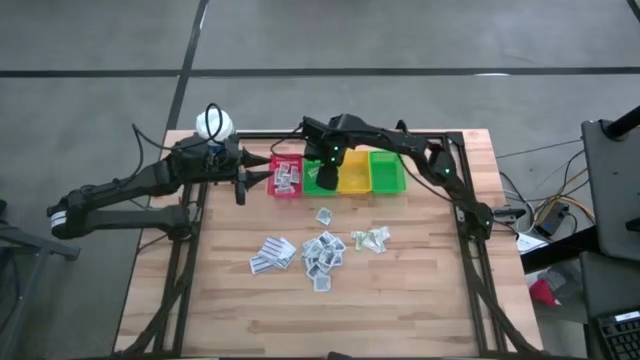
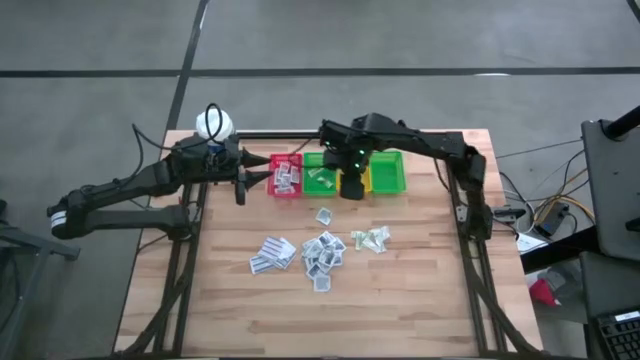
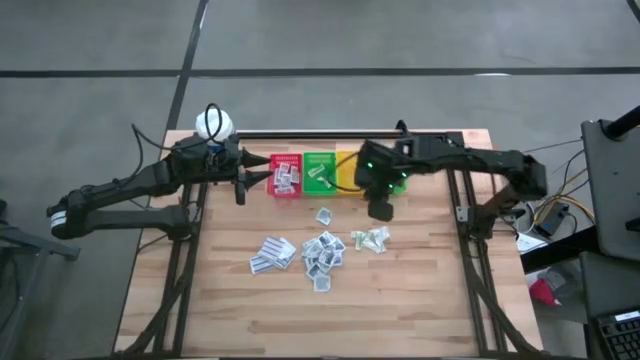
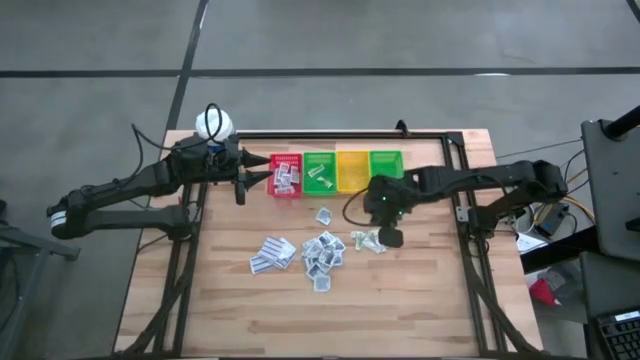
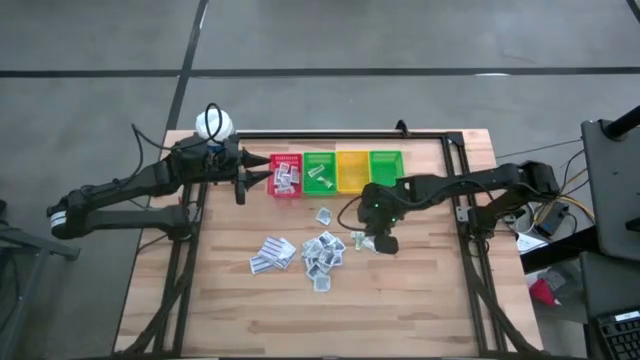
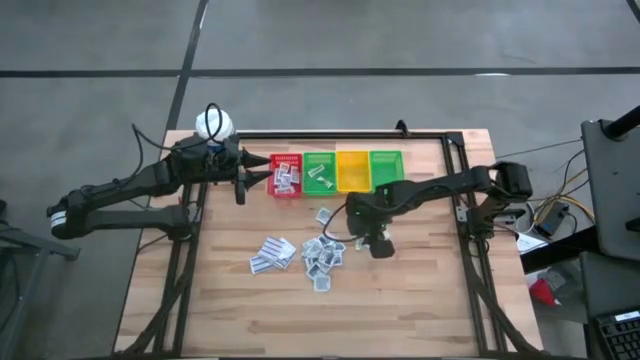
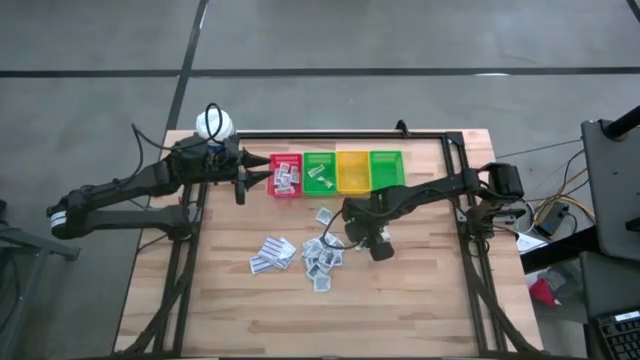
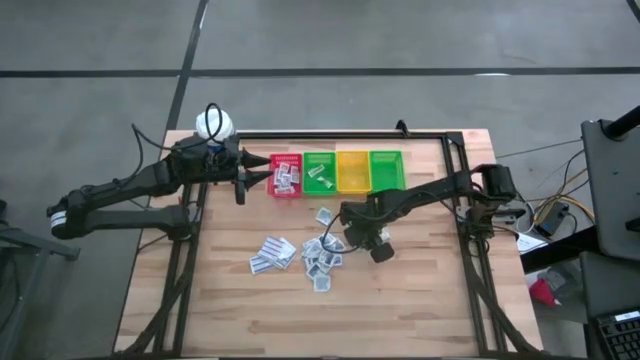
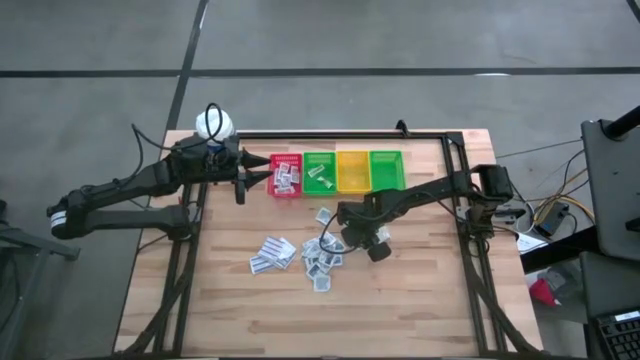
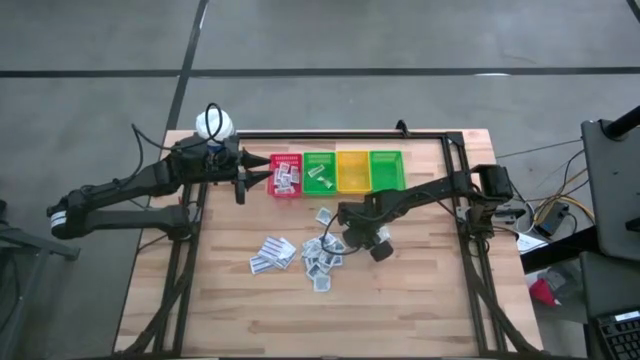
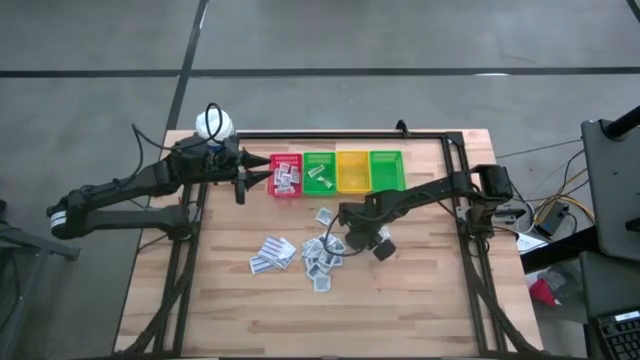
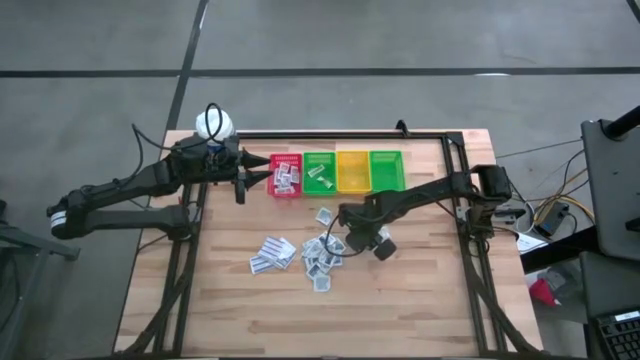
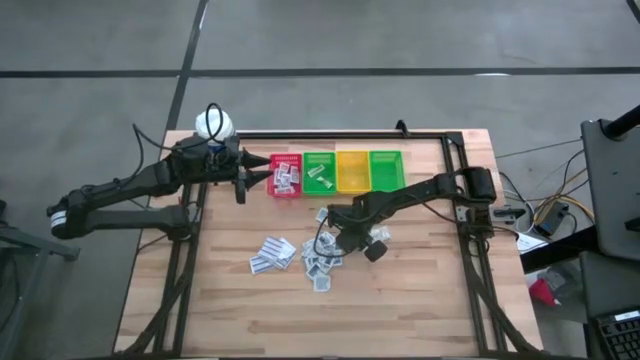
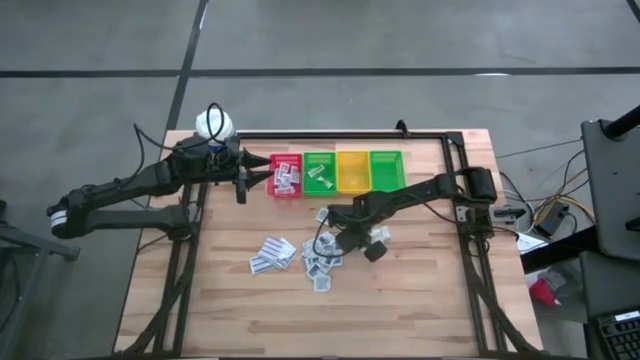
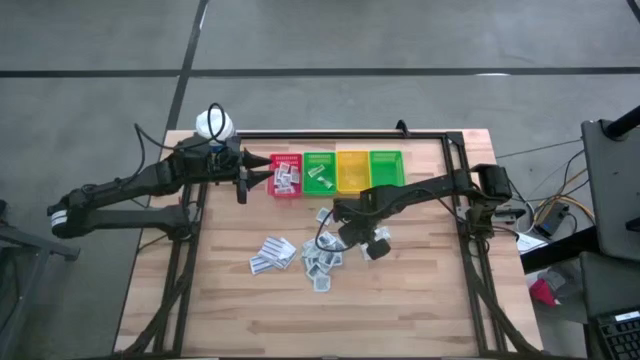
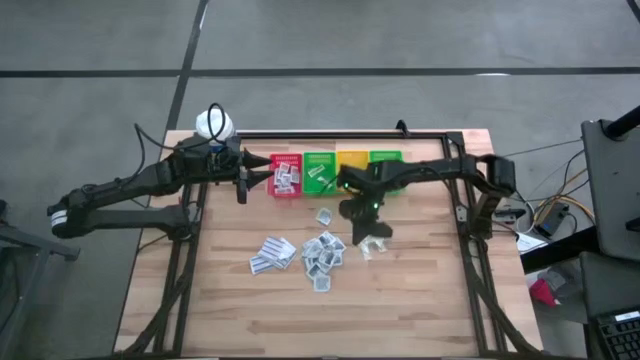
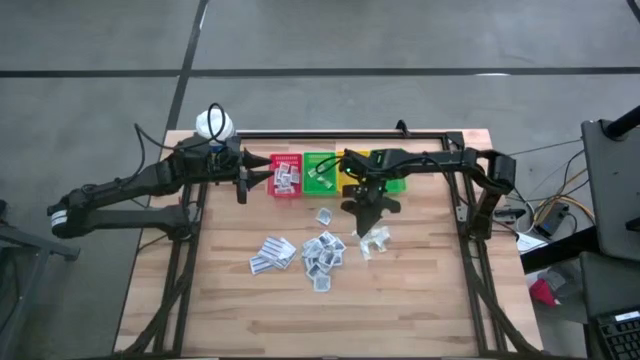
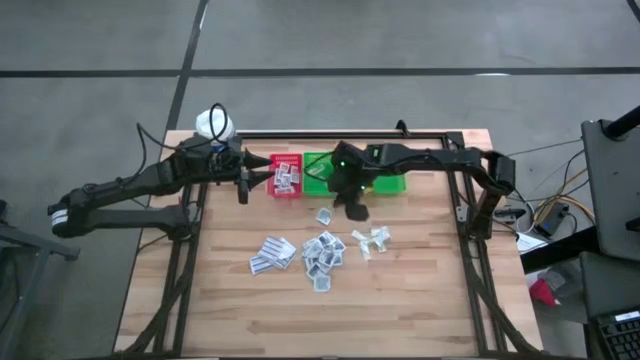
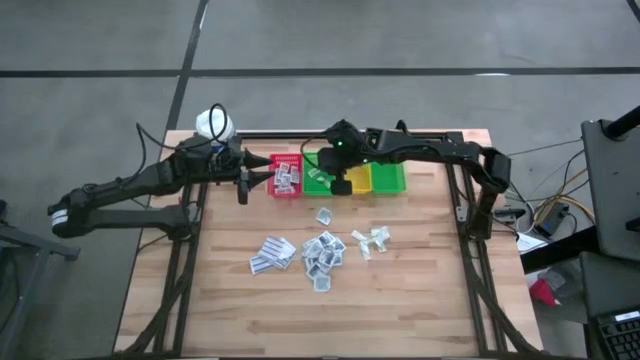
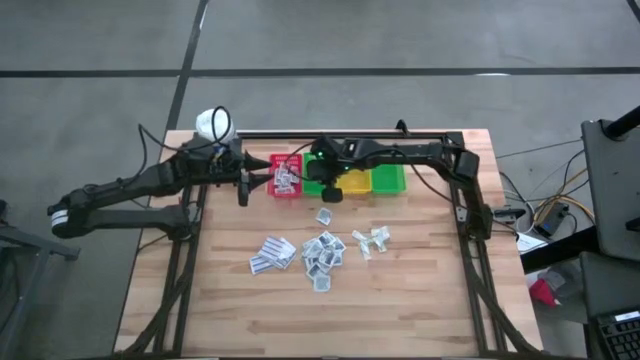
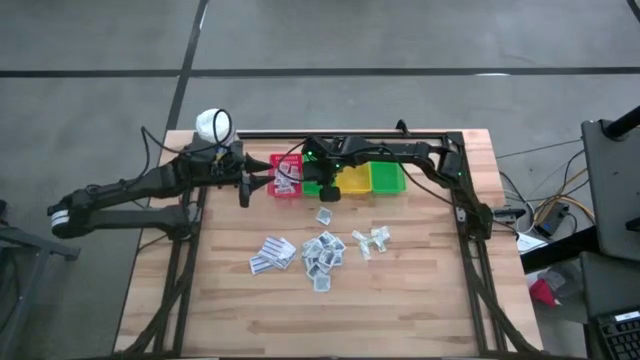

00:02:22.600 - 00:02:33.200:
Task: Pick & Place First Aid Supplies
Put the green bandage into the left green bin

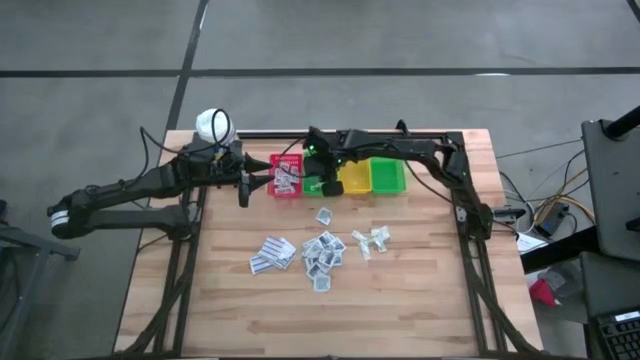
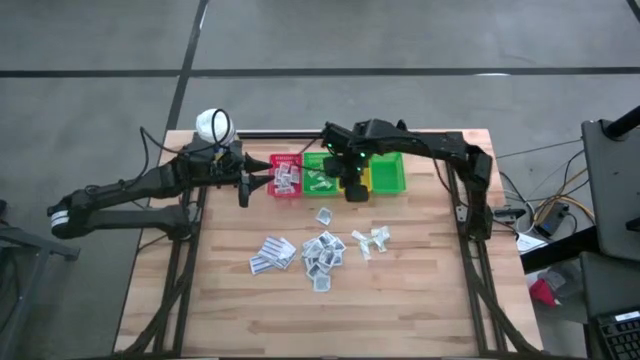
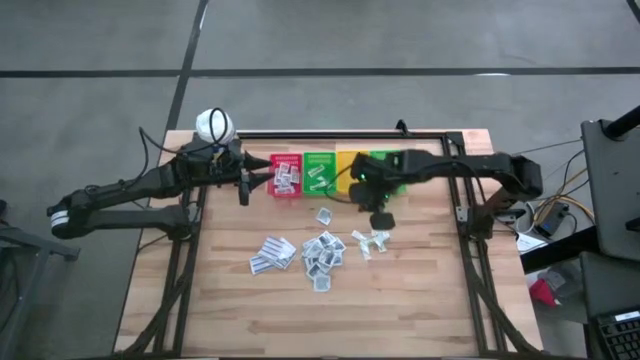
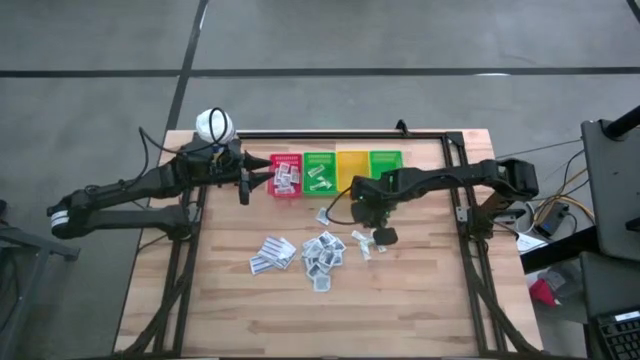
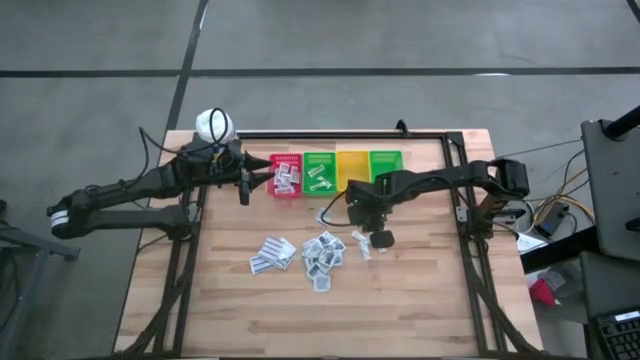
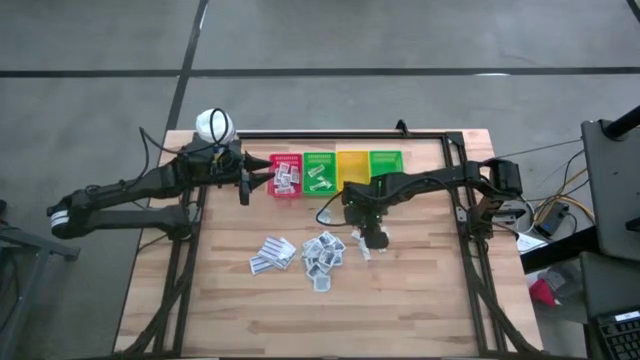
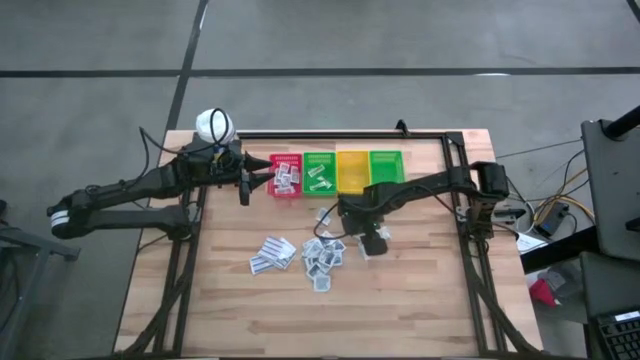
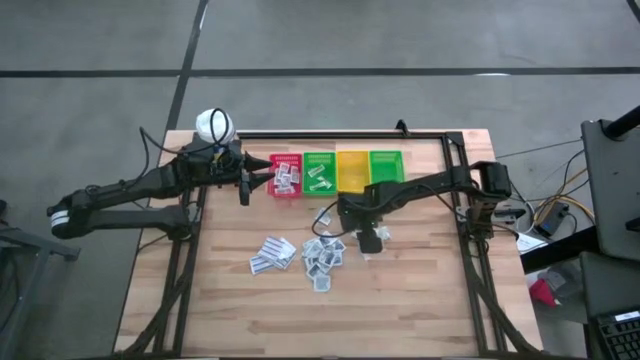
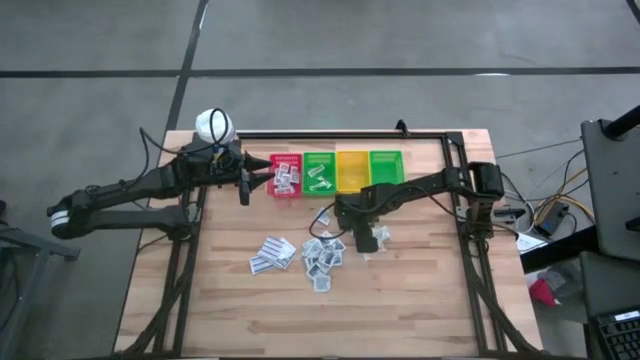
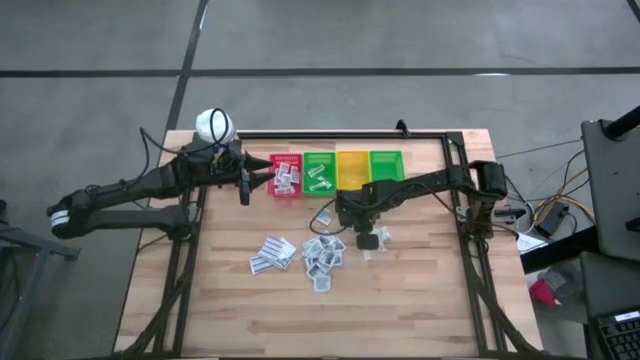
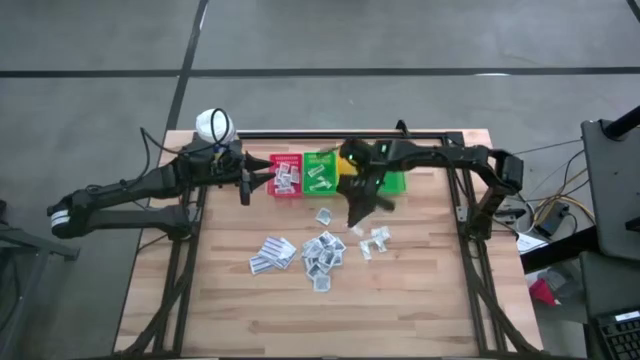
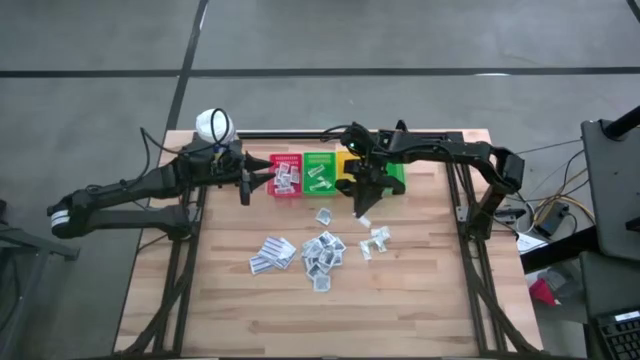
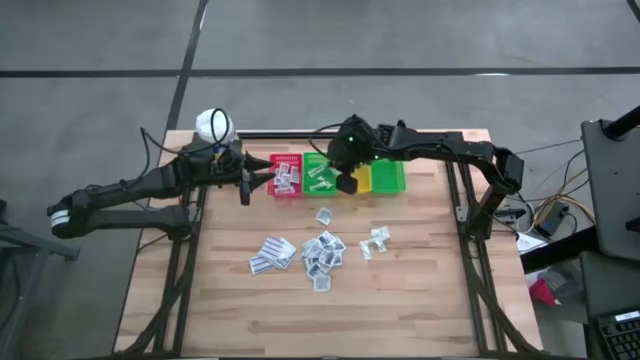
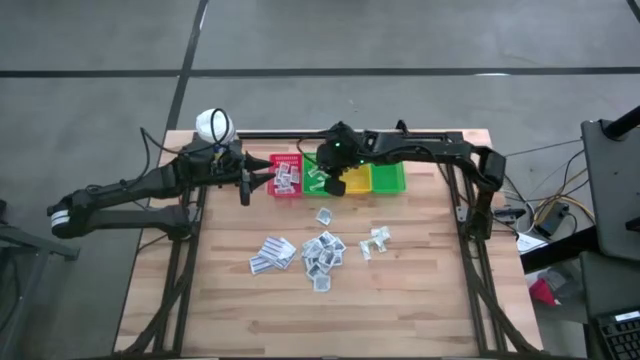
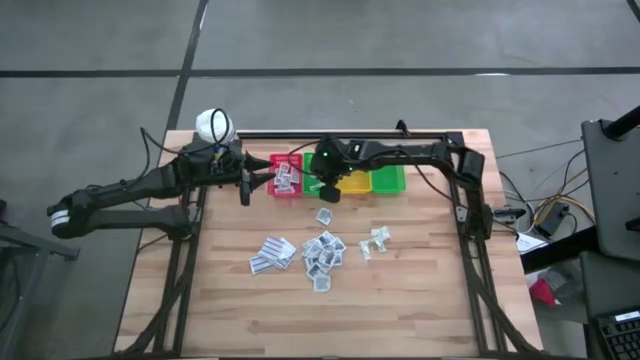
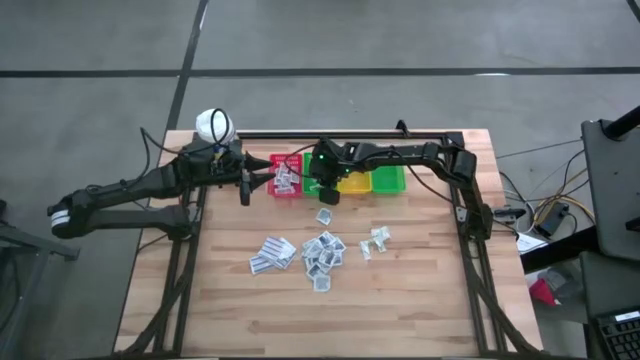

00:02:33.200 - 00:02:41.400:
Put the green bandage into the left green bin

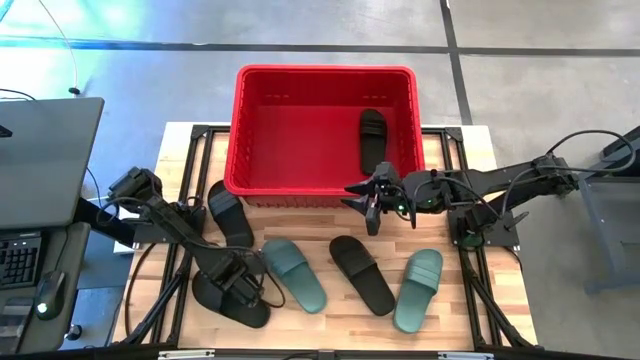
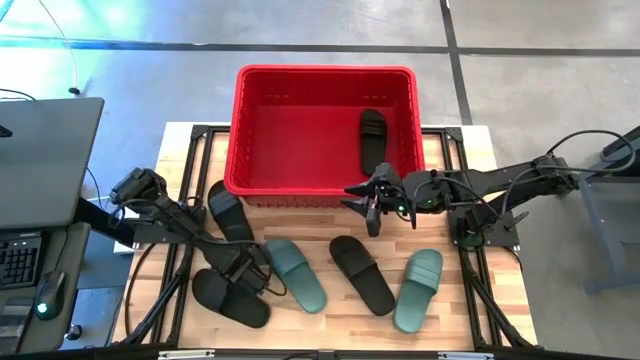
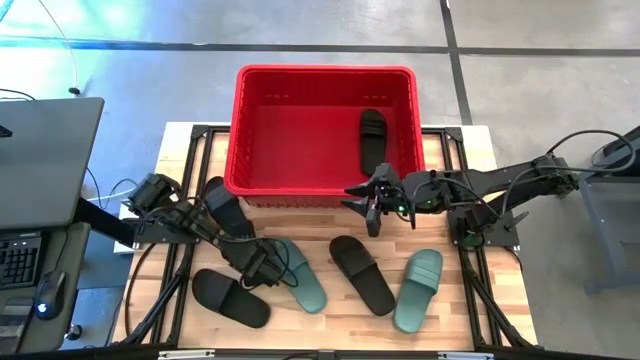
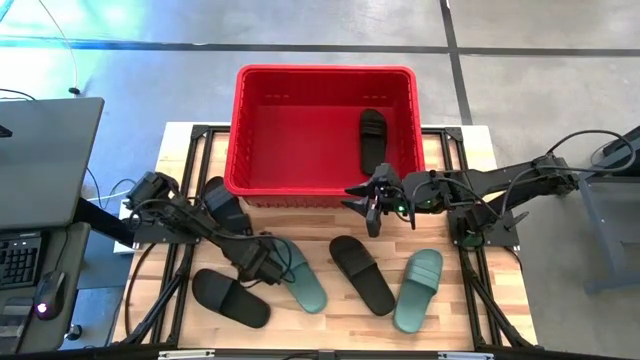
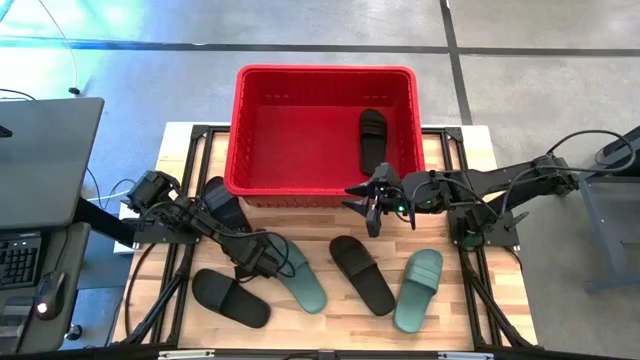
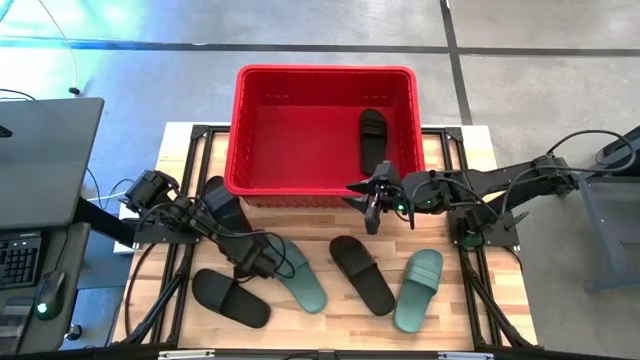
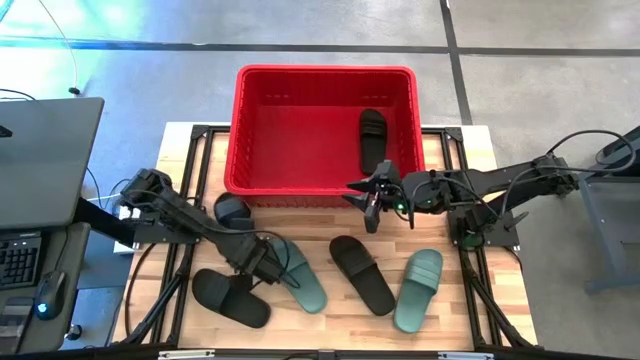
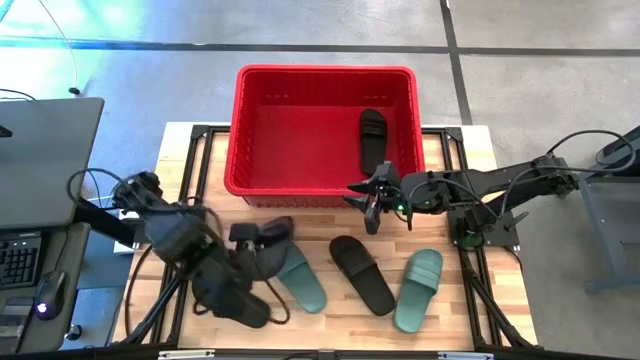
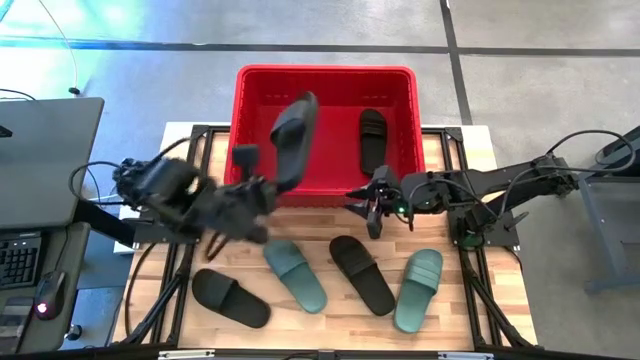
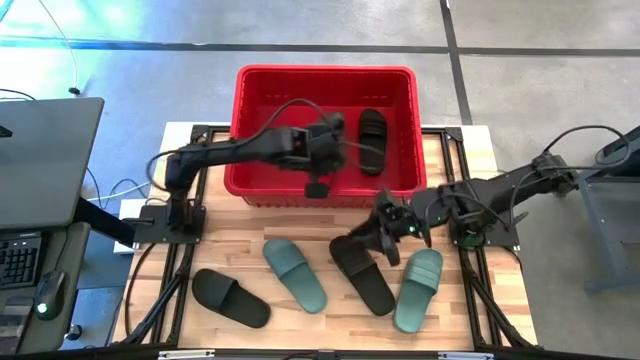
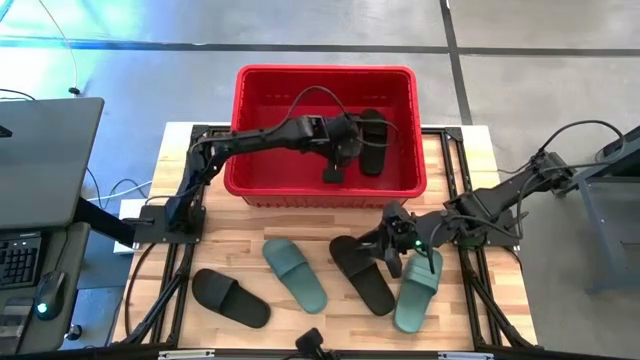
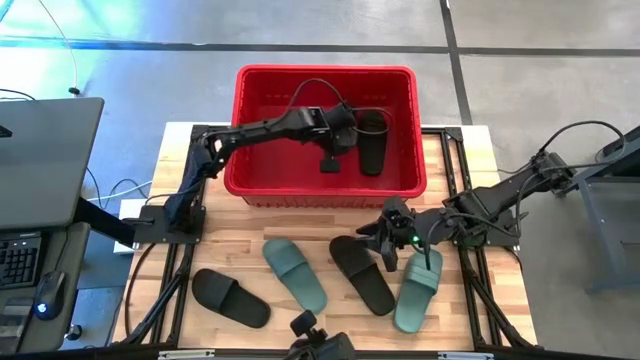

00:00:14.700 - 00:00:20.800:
Task: Pick and place slides into bin
Put the black slide into the red bin
